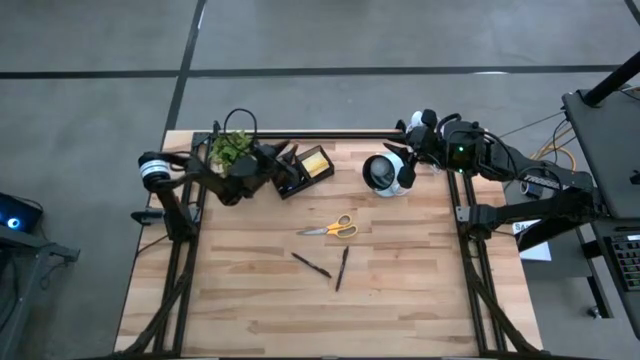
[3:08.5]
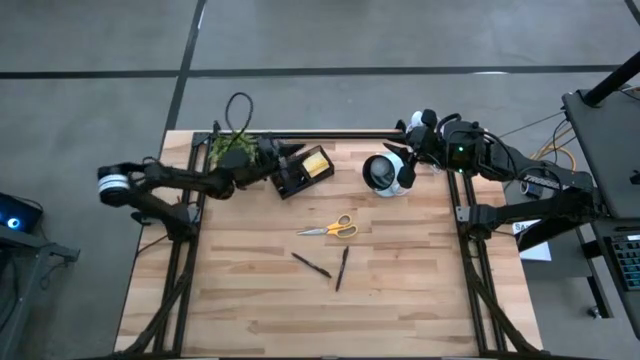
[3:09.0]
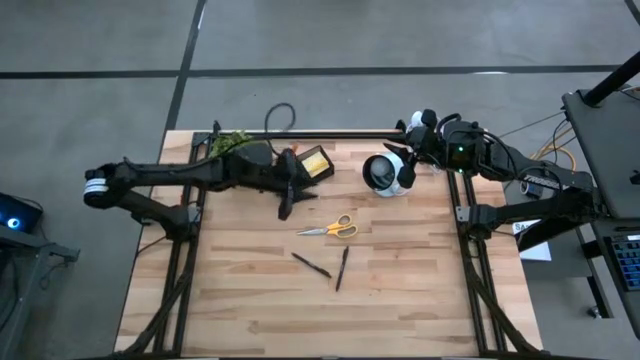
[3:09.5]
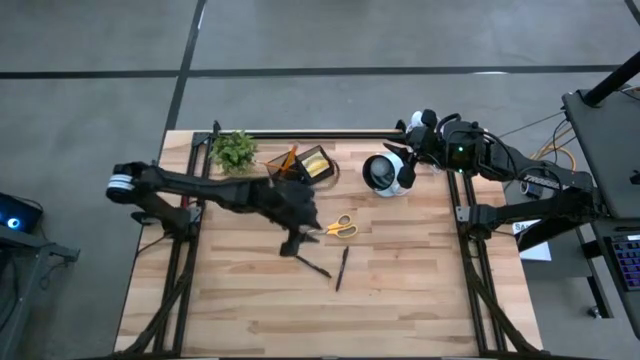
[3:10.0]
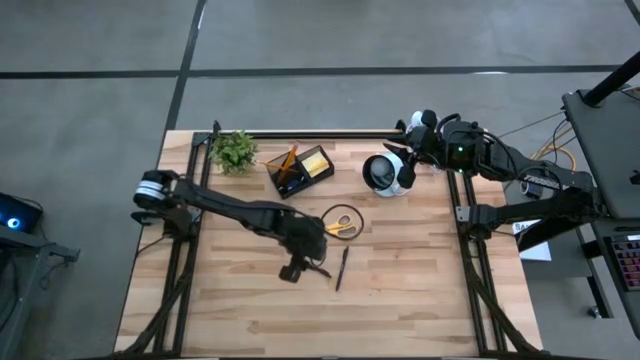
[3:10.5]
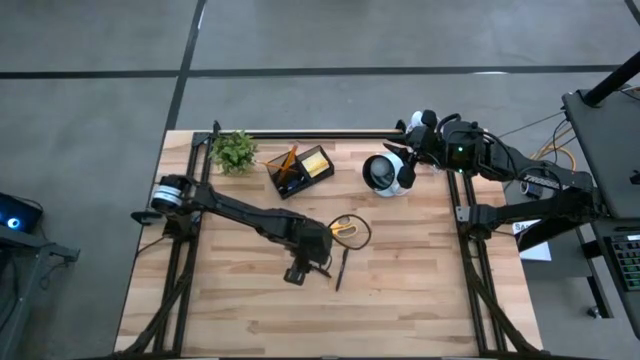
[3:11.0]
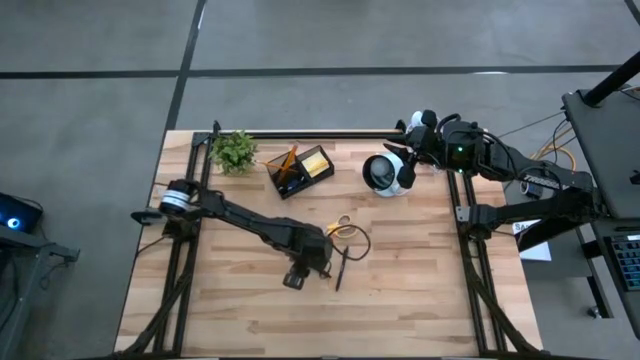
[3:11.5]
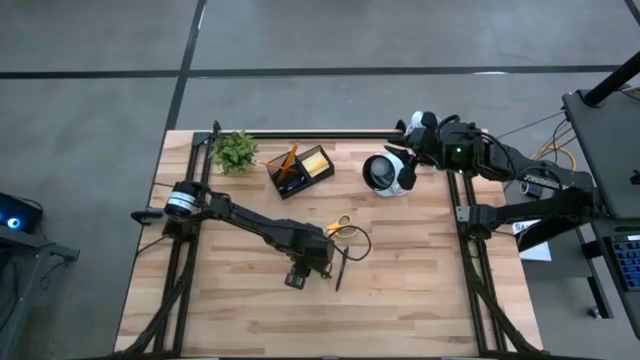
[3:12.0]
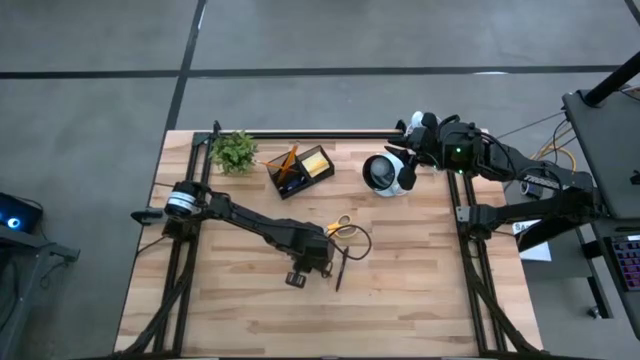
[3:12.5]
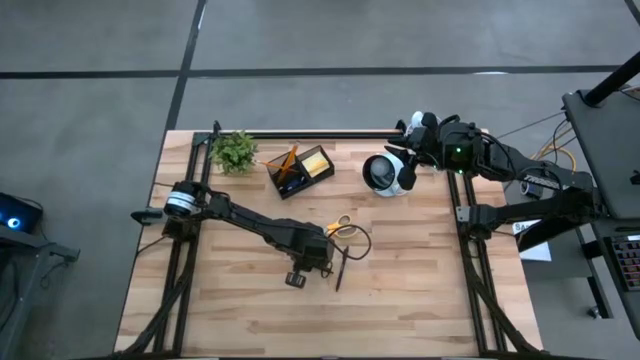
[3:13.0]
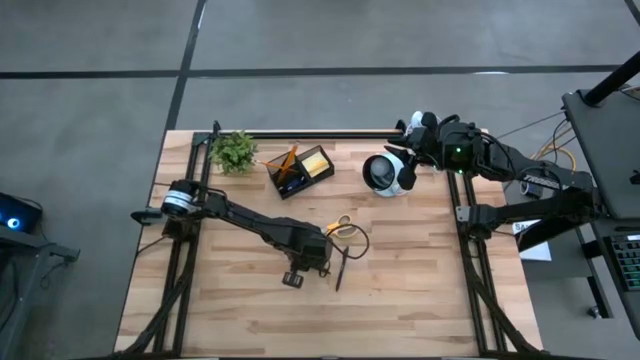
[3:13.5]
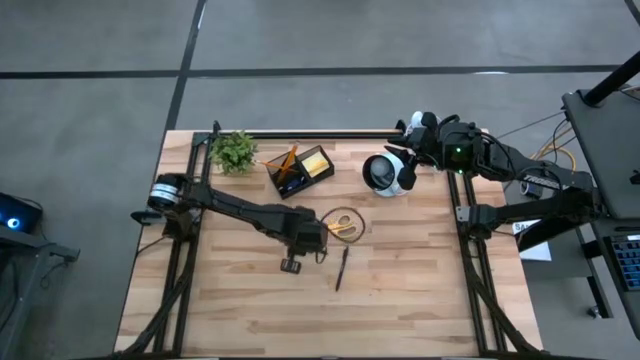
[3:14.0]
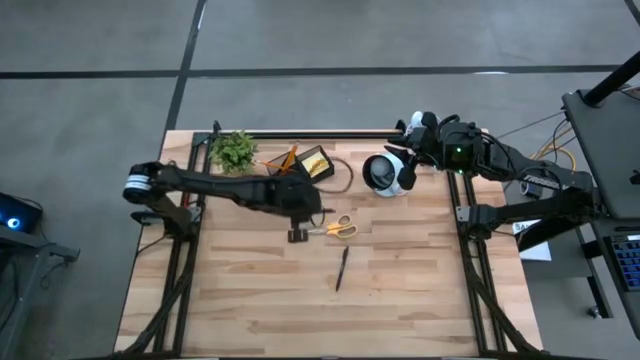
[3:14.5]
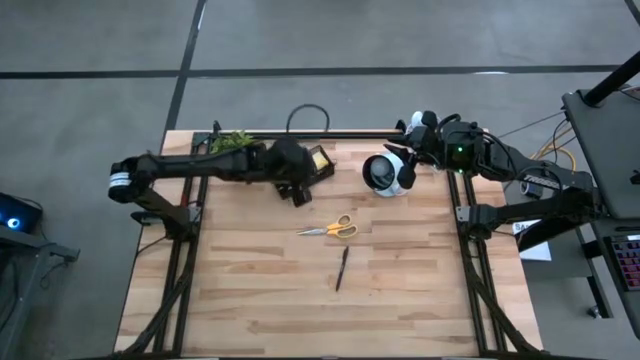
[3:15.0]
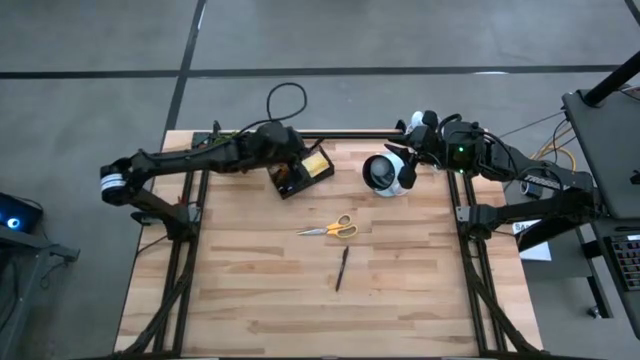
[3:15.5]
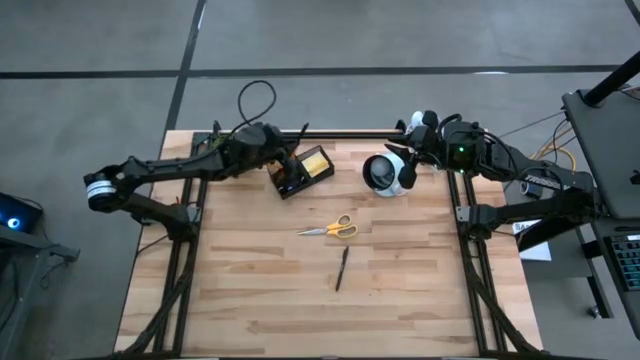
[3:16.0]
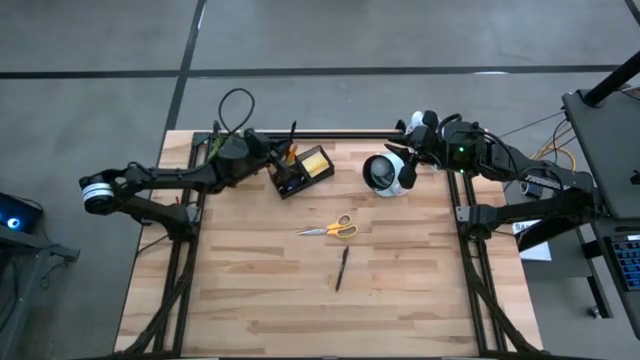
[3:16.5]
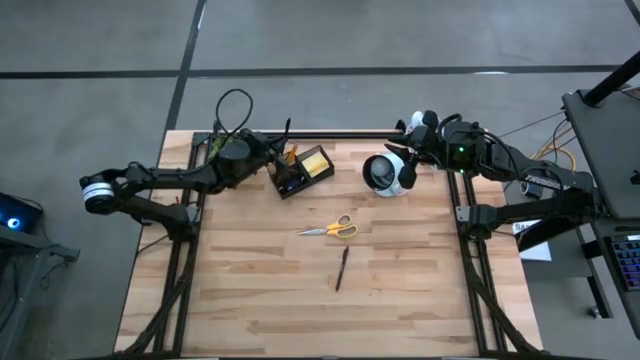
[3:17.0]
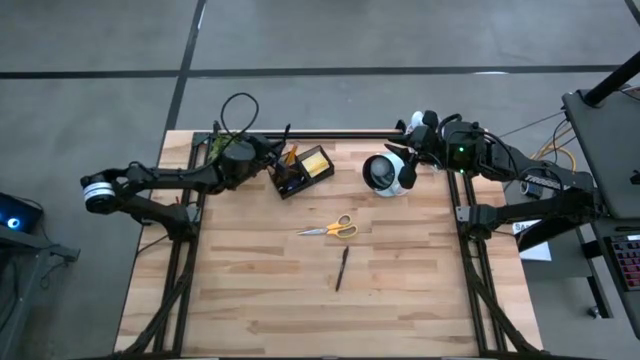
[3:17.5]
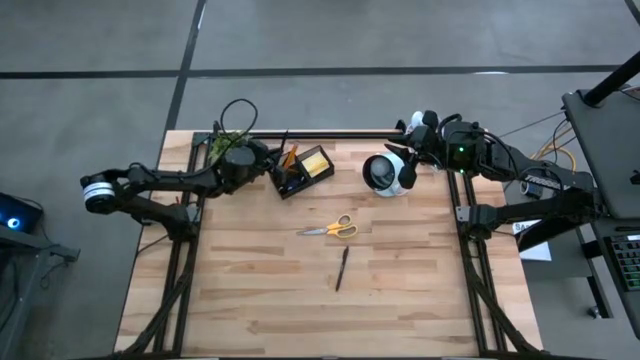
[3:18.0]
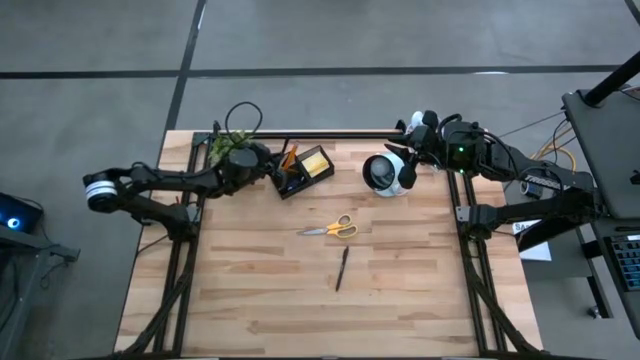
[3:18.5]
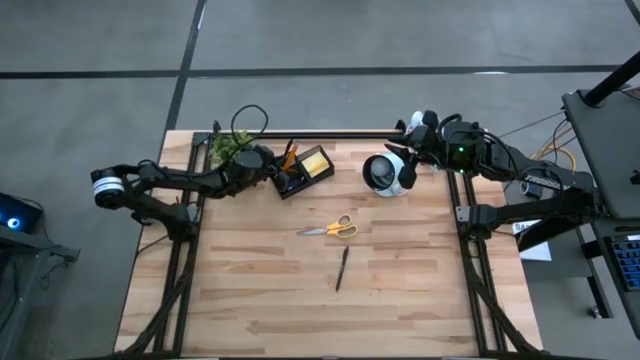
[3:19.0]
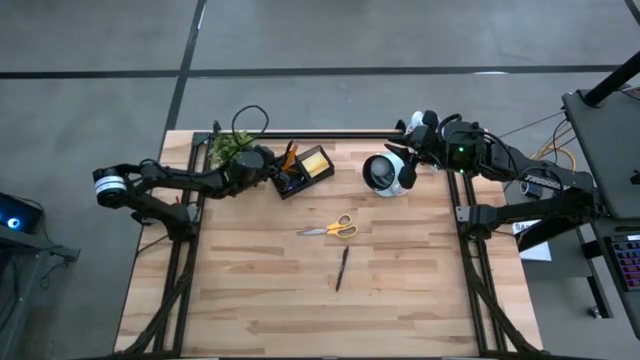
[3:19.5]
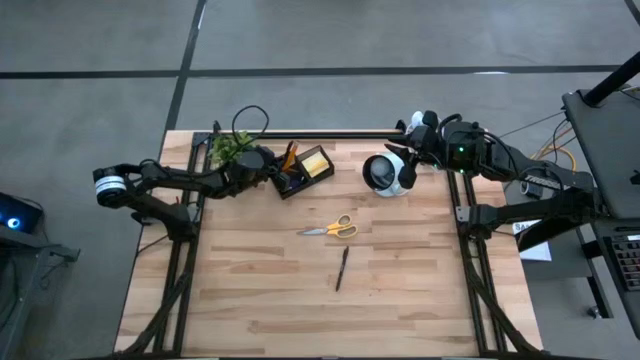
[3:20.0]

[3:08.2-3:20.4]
Task: Pick and place office supplies into organizer
Put the left black pen into the black desk organizer

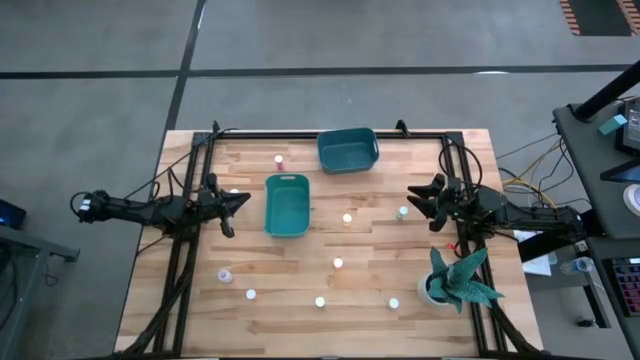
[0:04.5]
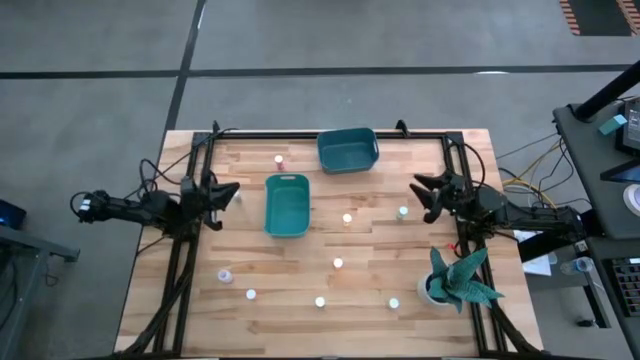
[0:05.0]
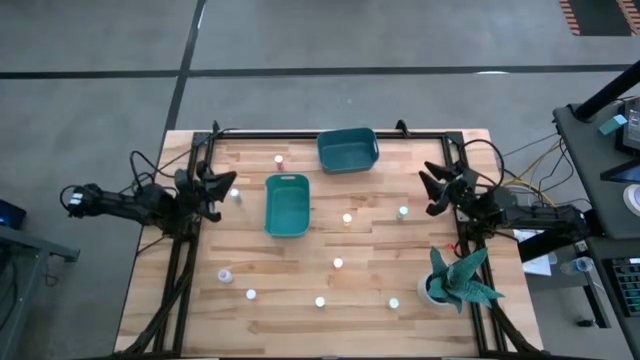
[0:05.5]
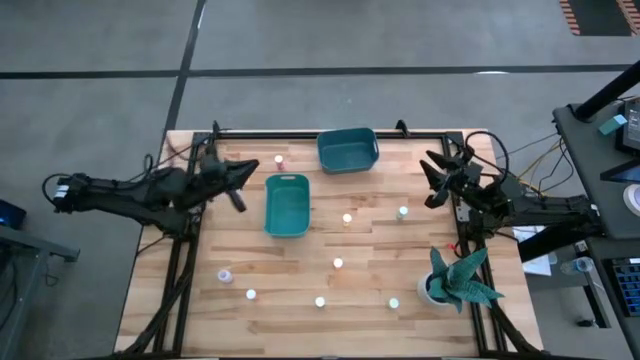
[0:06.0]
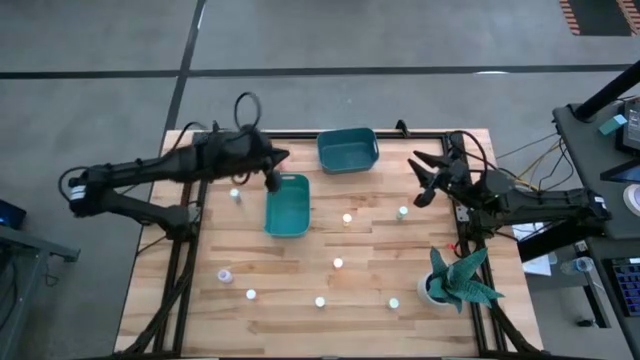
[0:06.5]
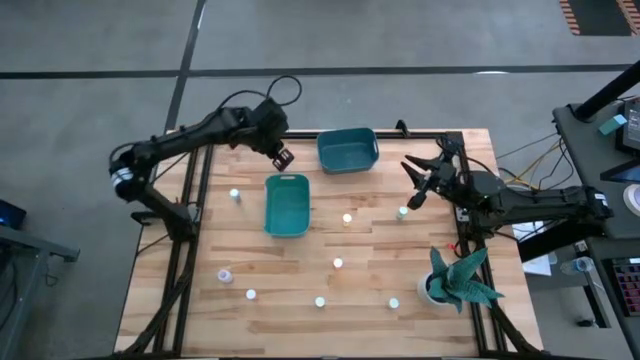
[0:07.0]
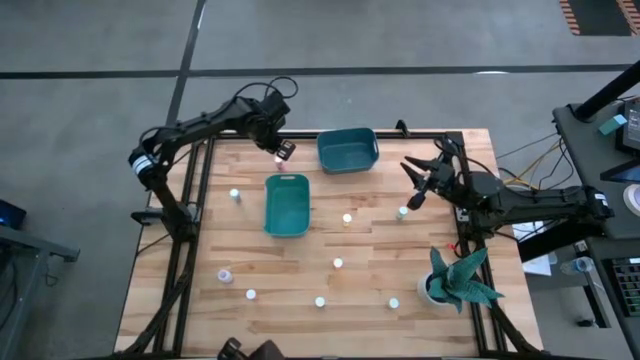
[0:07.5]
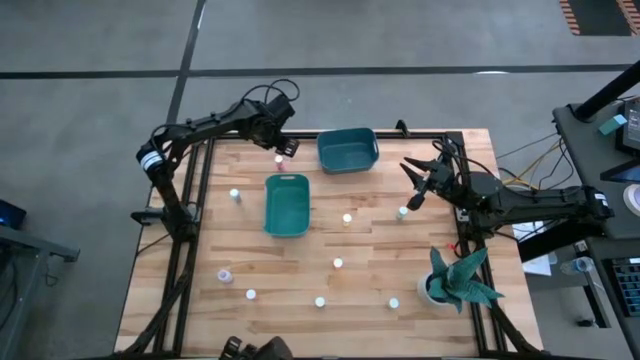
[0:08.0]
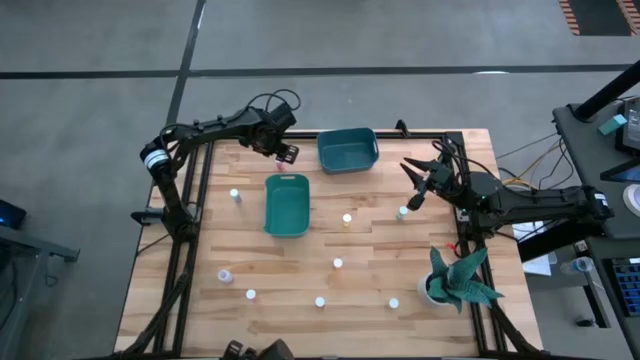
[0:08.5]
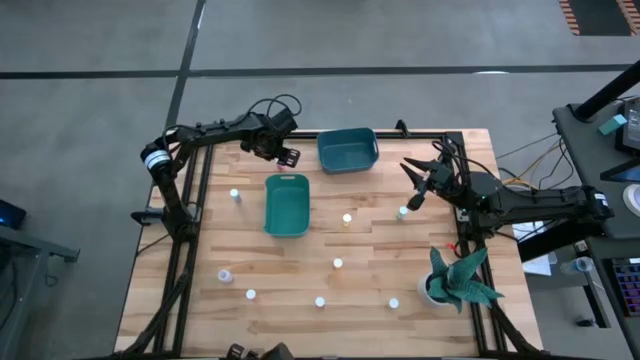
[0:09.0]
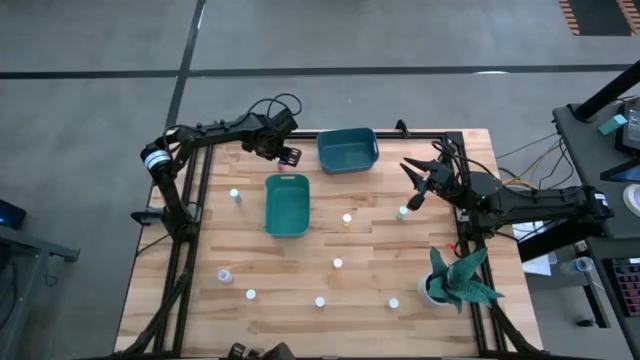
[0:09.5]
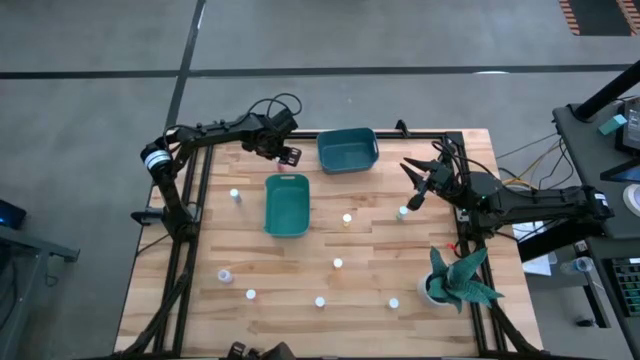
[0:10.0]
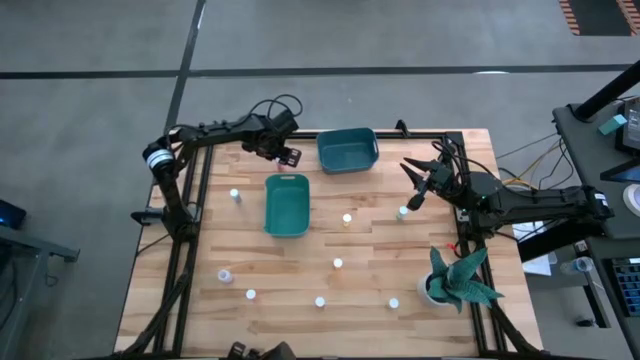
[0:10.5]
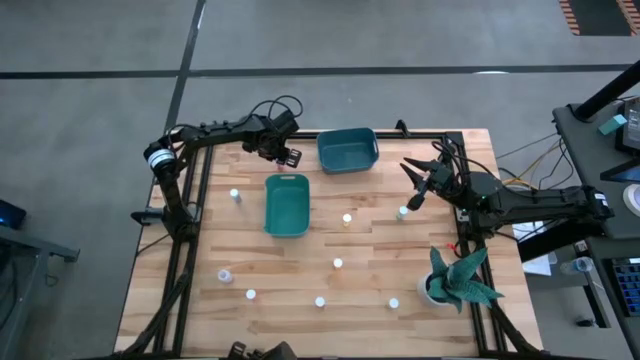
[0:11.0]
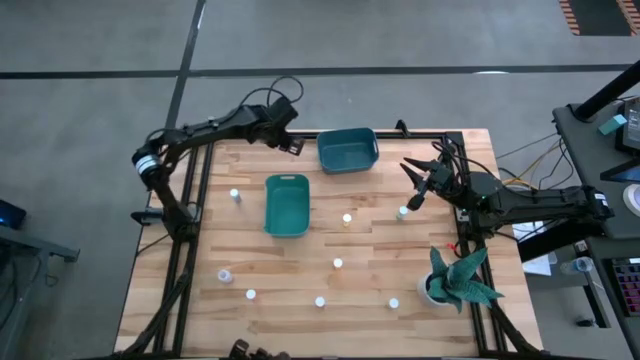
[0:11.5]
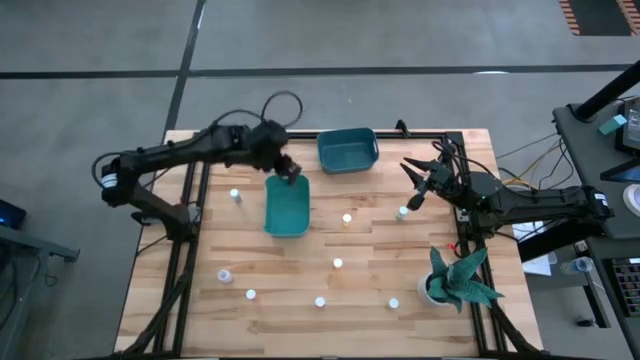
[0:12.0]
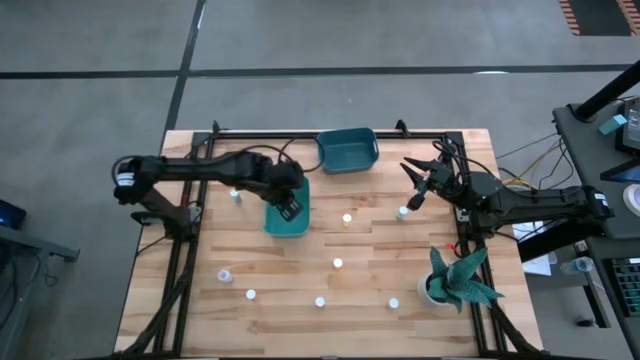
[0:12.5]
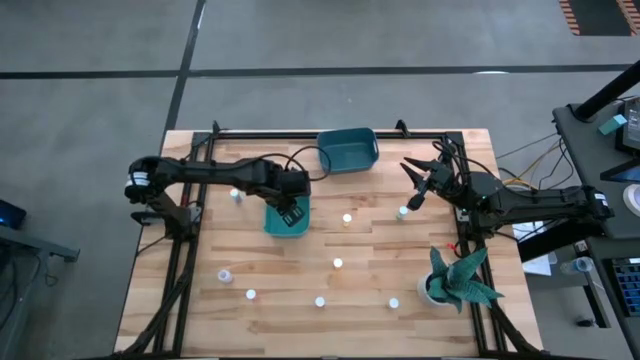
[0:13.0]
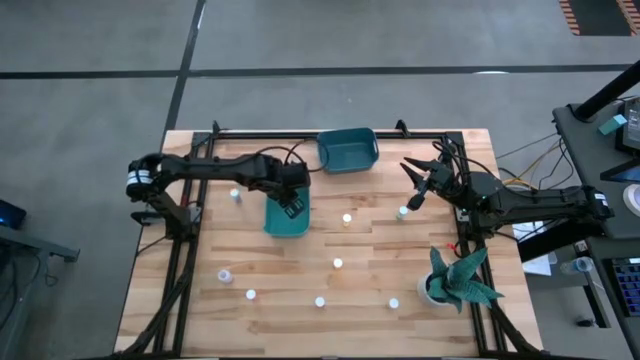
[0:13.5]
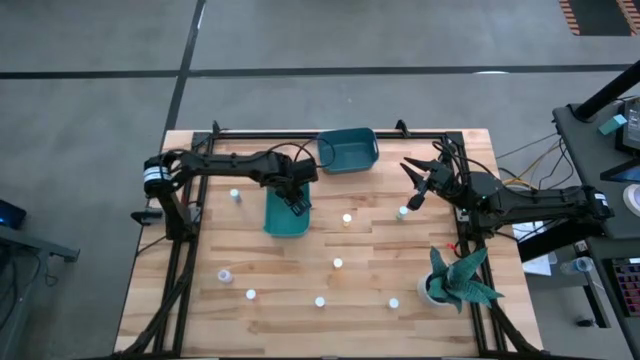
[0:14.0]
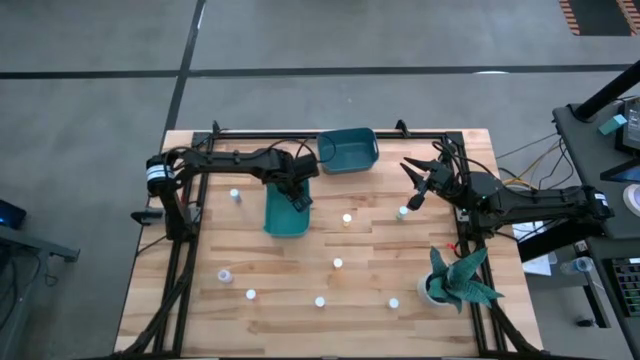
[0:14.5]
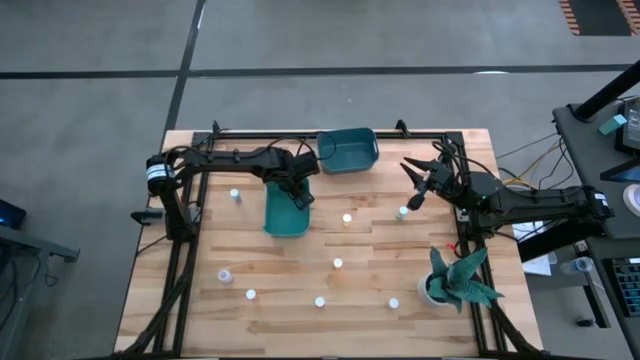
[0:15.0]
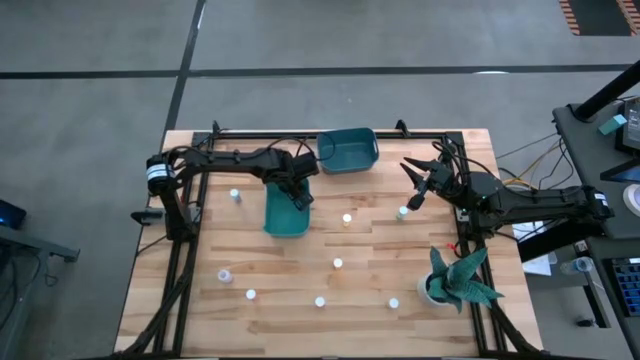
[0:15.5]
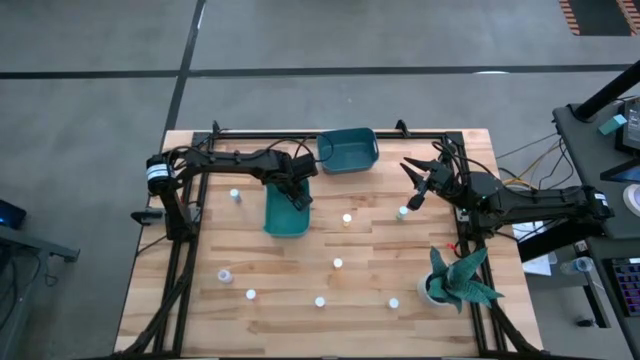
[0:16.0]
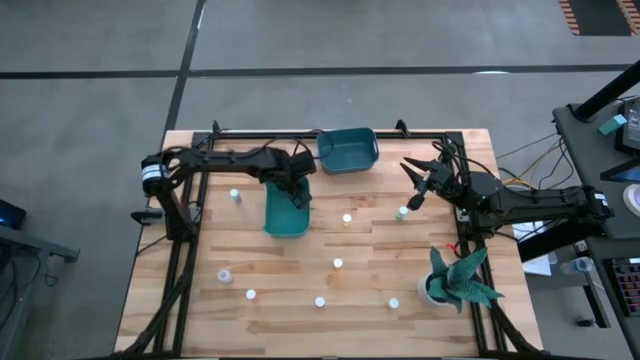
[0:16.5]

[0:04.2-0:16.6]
Task: Pick and place medicine bottles into bin by pill shape (circle, oval)
Put the top pink capsule pill bottle into the green bin
